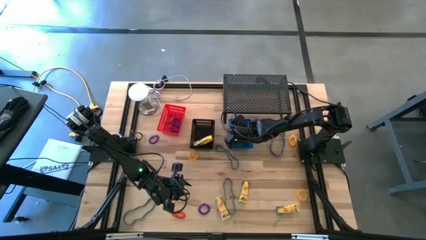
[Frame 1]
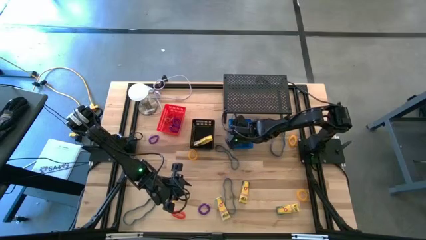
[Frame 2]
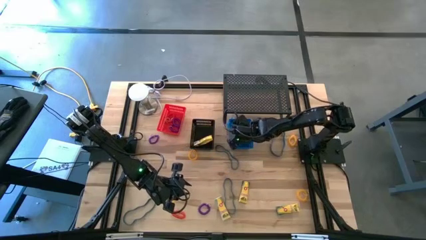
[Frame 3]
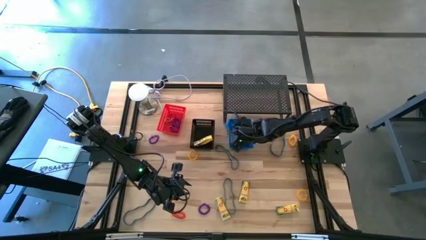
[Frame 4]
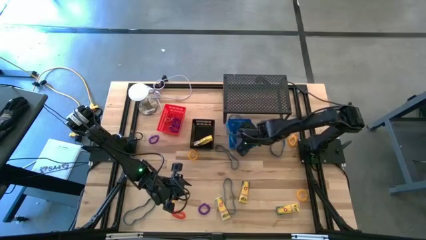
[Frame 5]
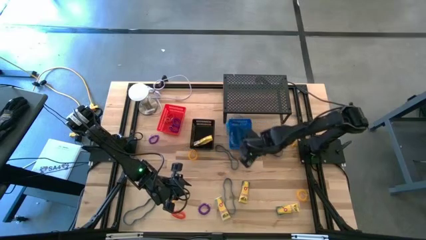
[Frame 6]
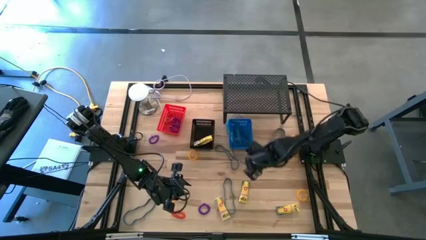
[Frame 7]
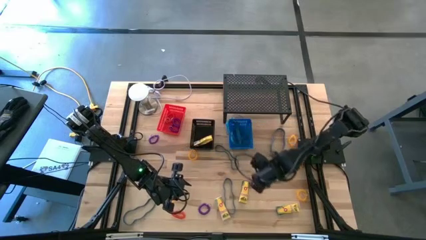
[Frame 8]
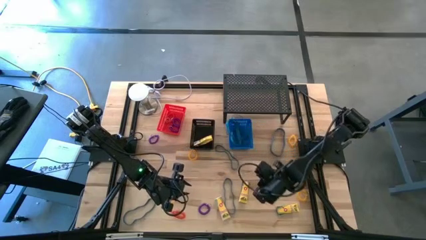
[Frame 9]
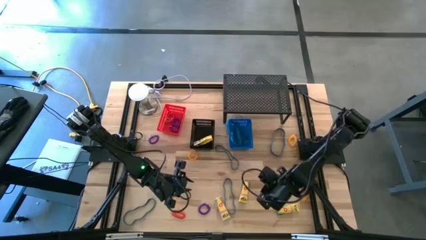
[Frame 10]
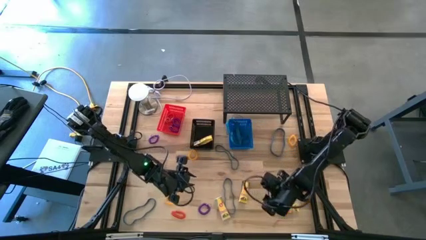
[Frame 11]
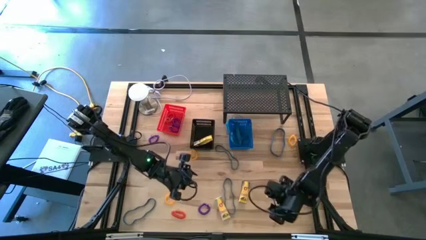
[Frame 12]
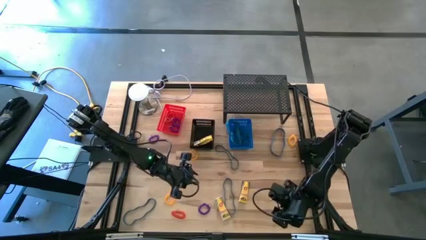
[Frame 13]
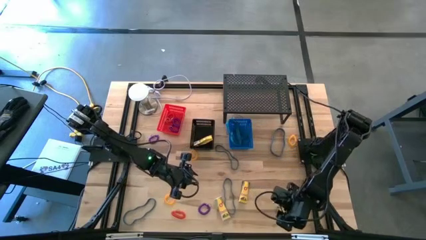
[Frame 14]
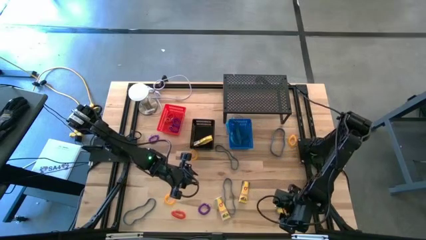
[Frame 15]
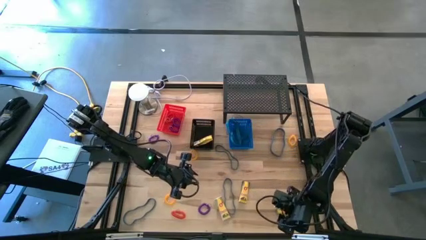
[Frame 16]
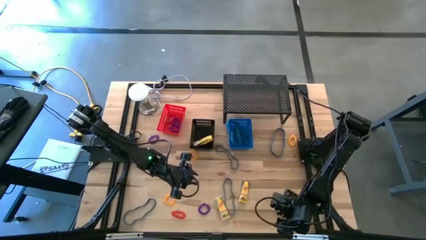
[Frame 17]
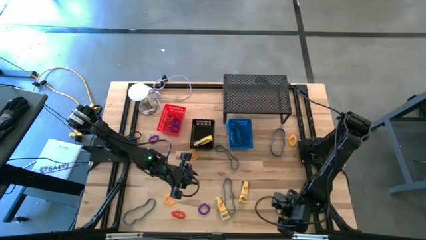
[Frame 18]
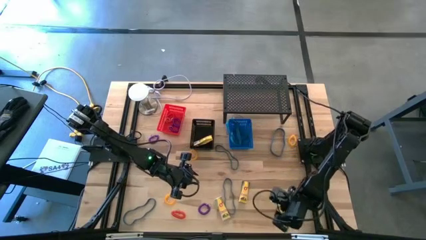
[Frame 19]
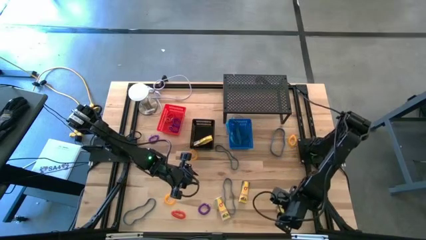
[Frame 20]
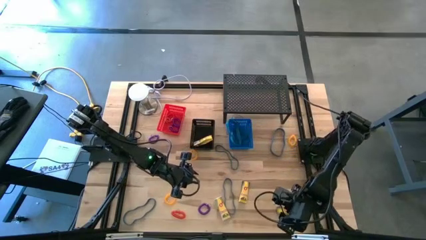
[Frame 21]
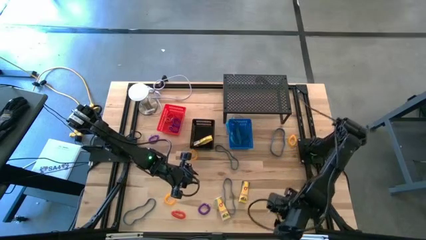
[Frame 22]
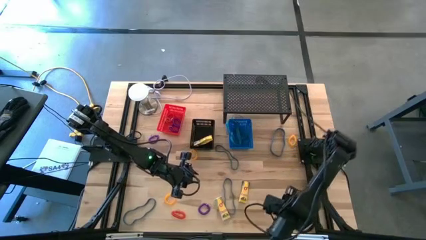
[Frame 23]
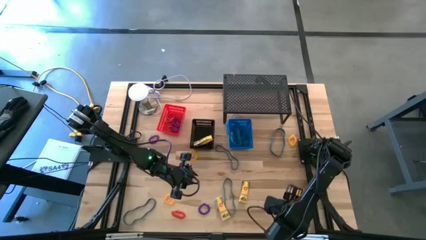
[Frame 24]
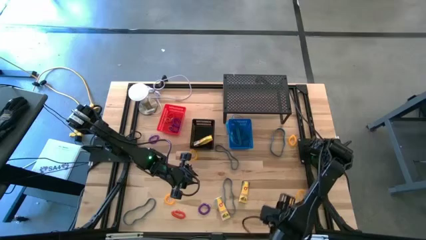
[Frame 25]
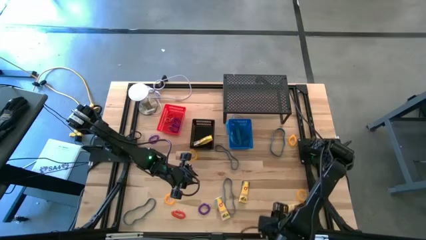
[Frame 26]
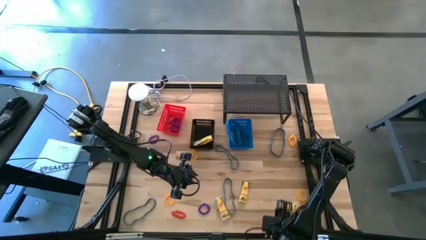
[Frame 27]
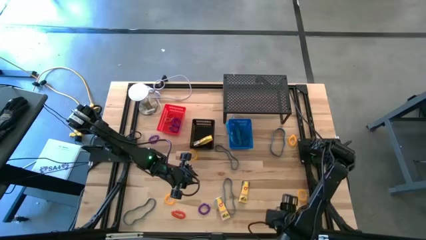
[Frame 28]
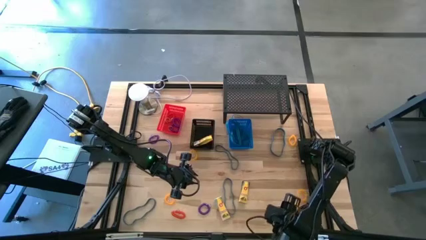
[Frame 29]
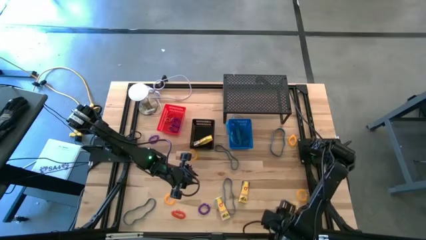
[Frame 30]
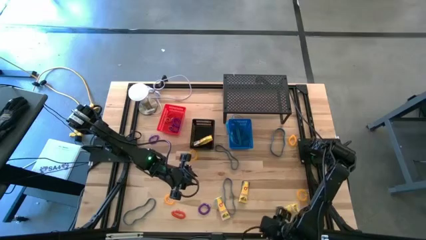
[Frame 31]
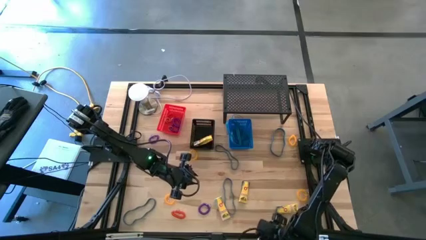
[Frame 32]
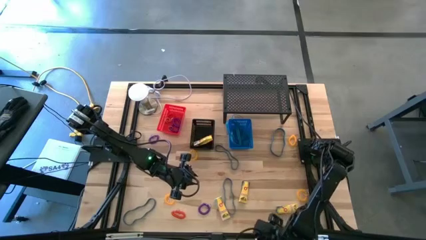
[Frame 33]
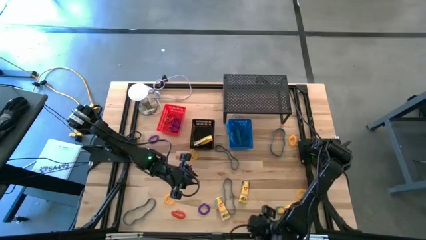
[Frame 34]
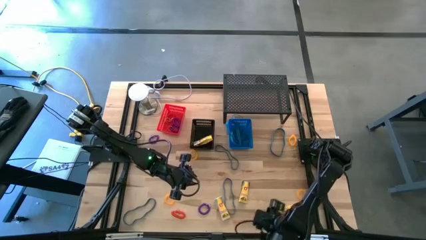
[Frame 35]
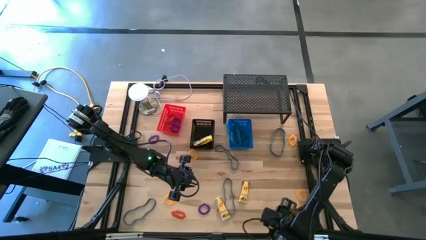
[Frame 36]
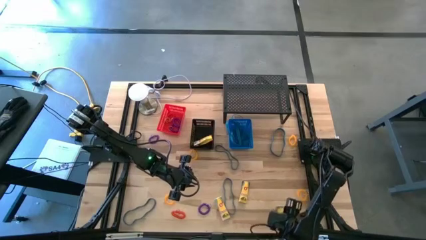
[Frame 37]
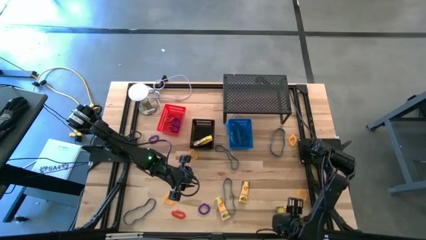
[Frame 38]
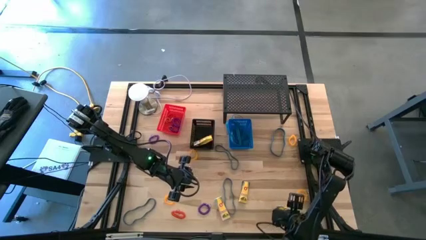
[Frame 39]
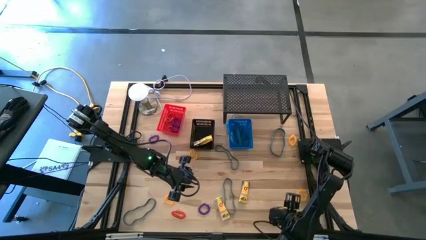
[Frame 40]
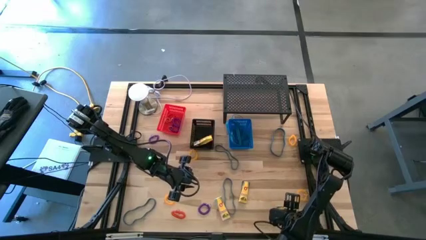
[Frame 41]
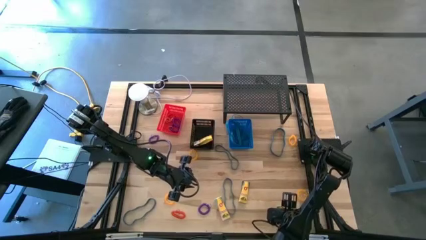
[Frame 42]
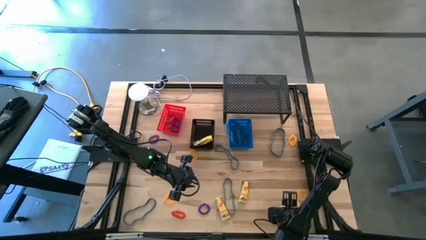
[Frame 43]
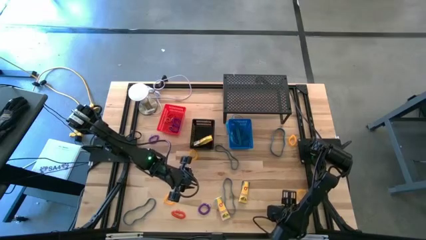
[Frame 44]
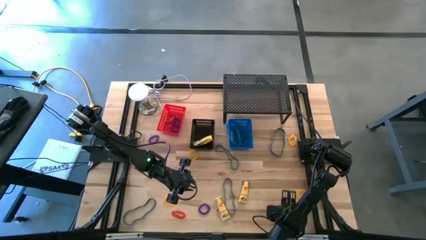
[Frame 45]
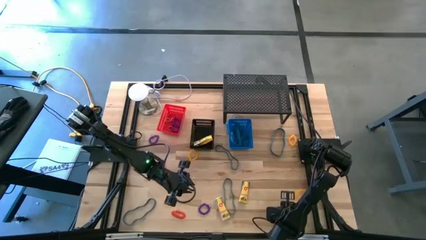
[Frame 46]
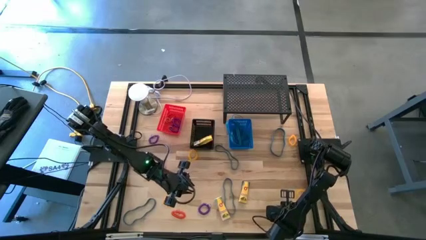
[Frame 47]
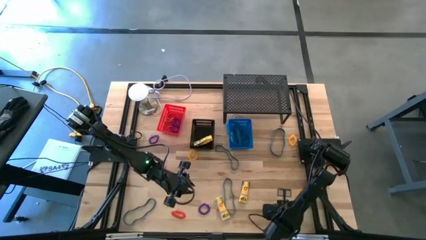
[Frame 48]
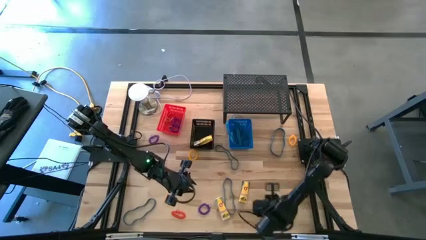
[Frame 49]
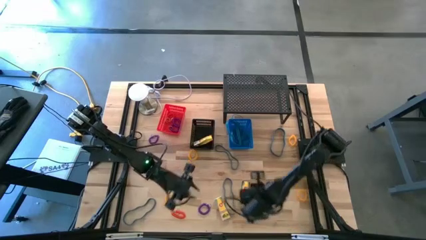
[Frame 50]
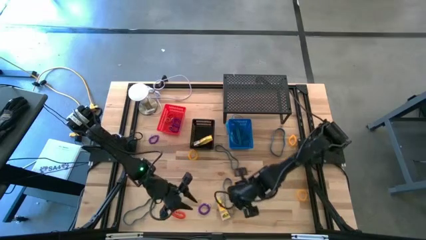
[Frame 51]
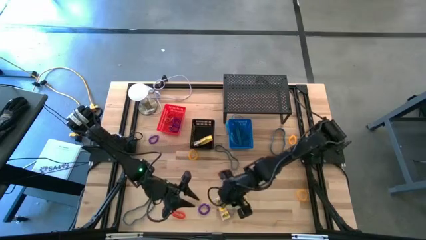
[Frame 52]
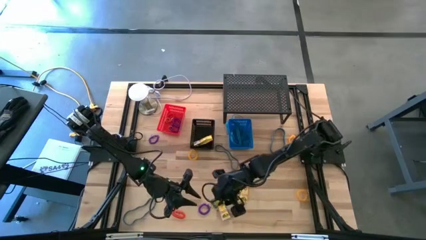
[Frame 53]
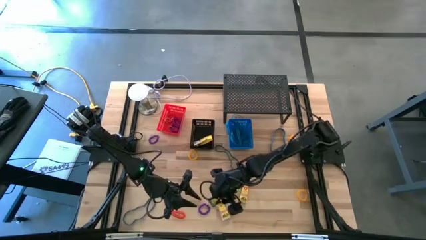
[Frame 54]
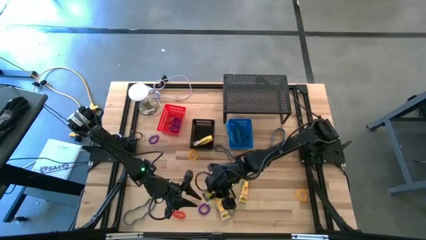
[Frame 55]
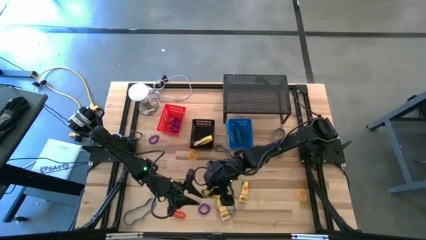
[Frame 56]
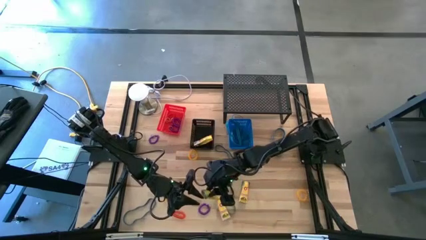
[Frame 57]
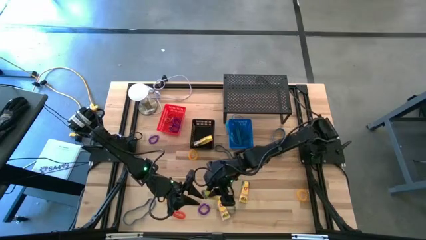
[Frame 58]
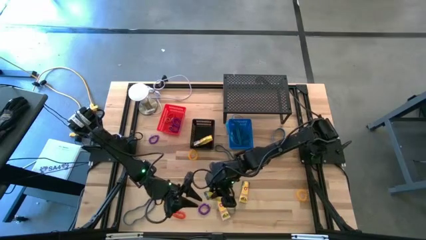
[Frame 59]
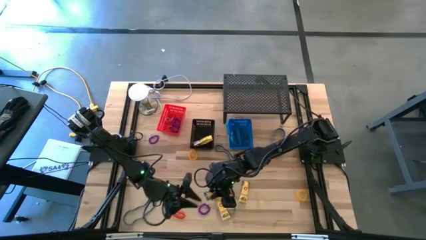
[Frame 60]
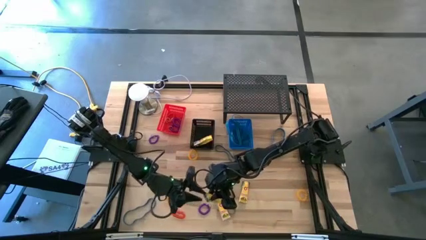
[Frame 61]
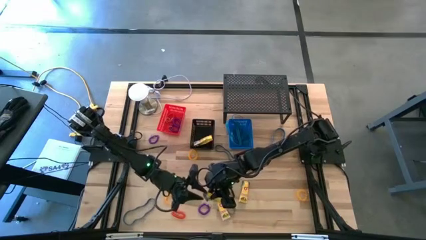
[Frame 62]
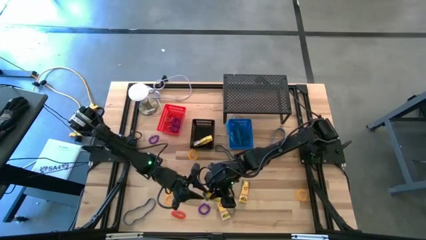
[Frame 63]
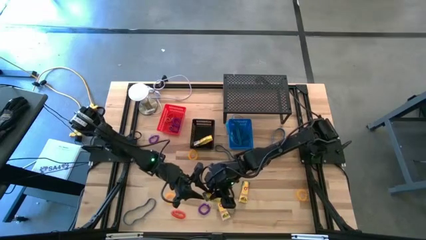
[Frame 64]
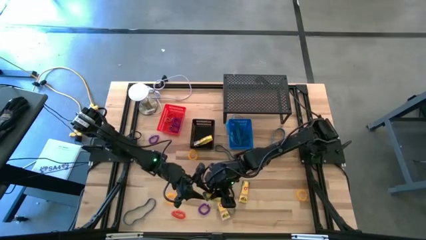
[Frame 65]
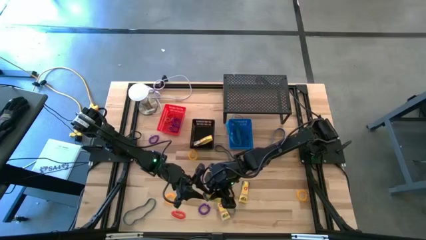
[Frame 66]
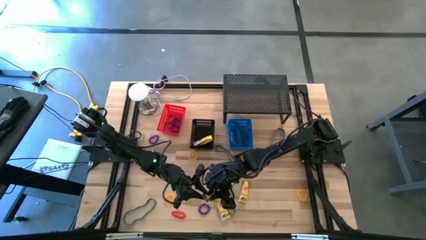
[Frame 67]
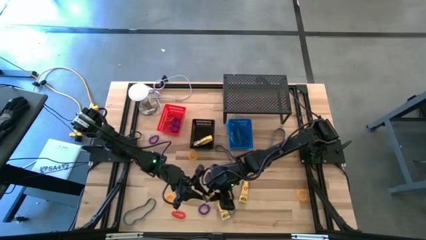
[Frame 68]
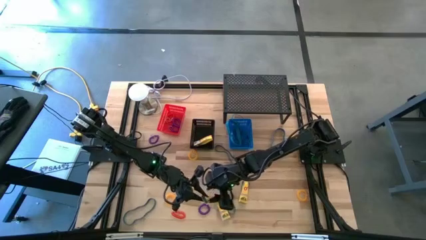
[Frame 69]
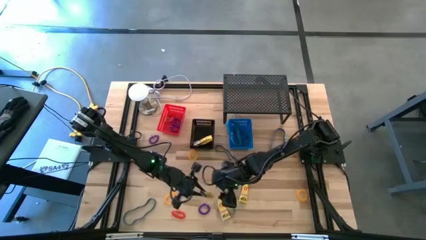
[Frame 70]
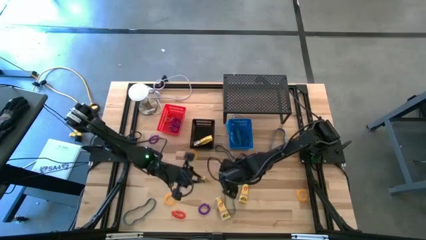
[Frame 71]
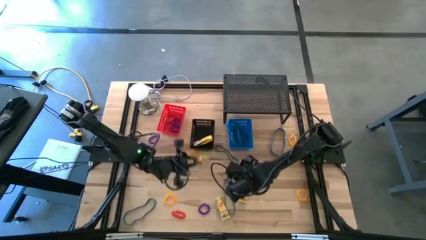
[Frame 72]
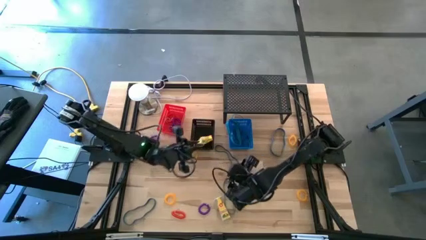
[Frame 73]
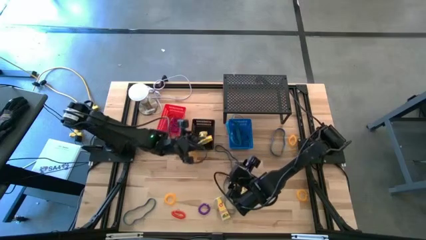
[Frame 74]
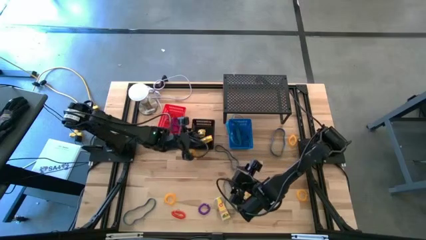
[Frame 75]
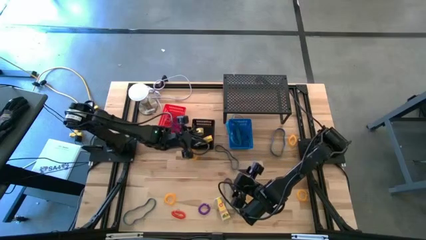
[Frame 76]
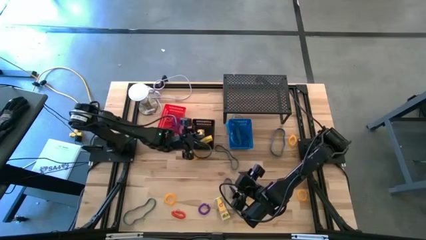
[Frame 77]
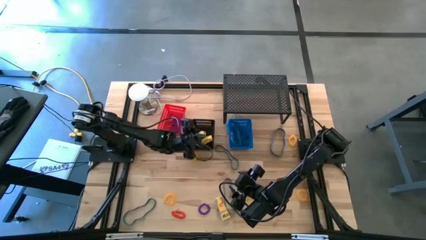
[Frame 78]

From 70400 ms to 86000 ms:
Task: Pick & Place Office Desk Supplies
Put the right crayon box into the black bin
